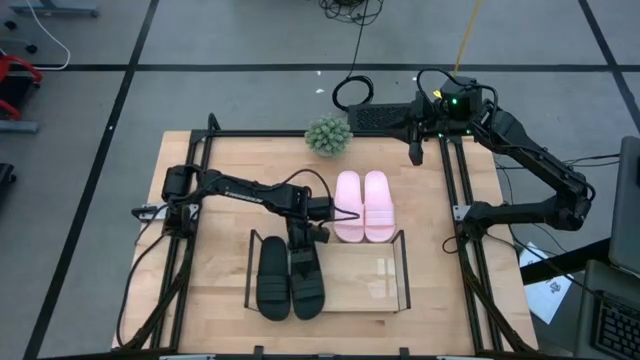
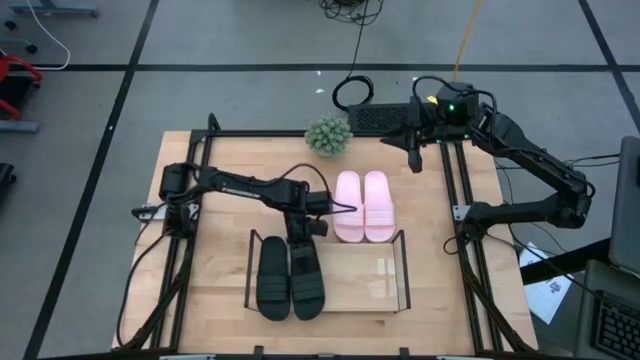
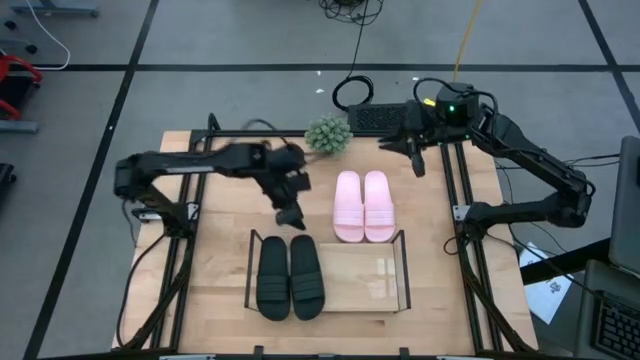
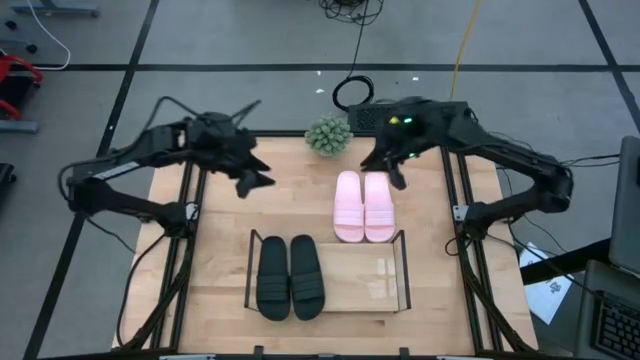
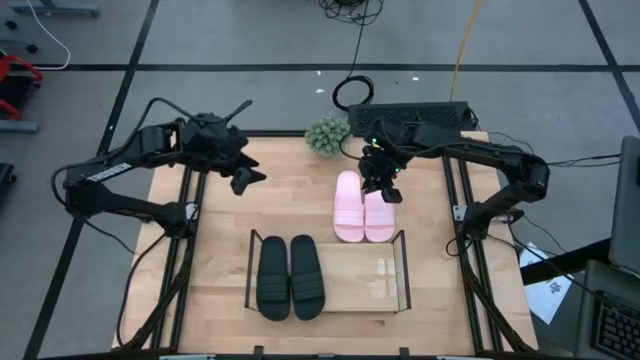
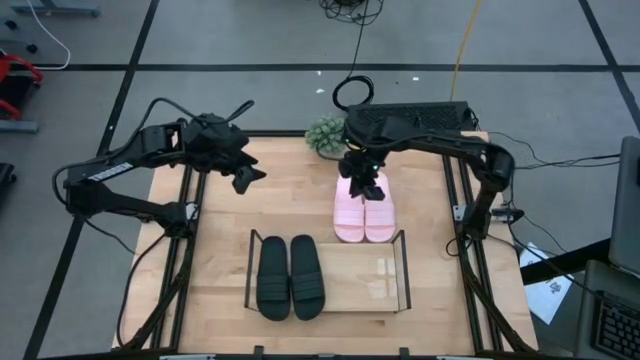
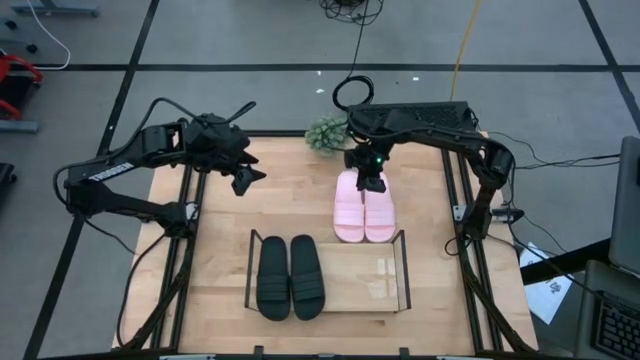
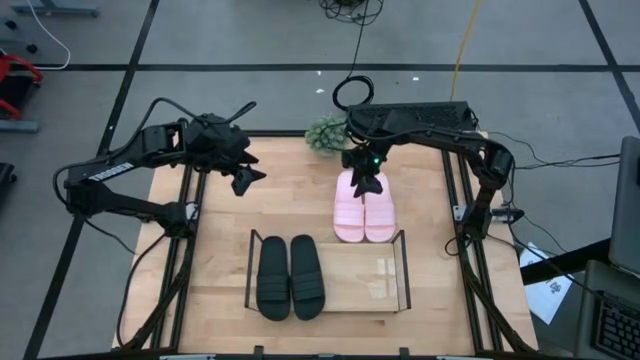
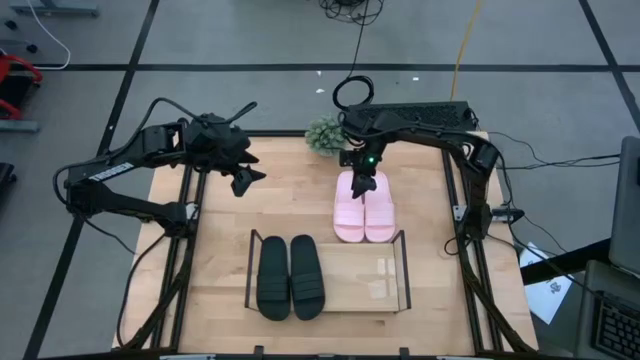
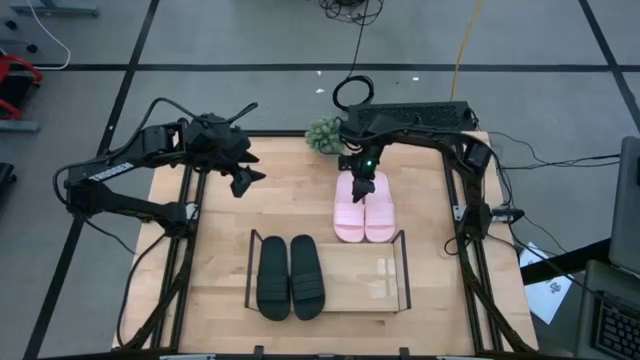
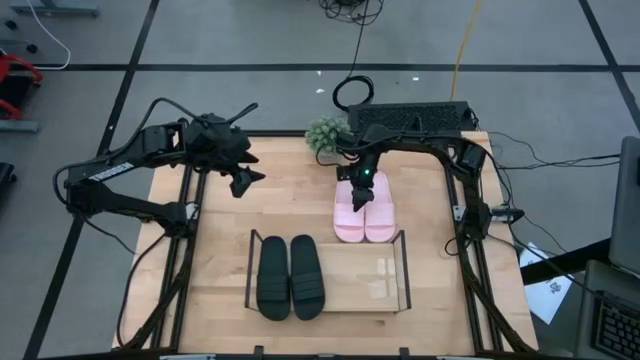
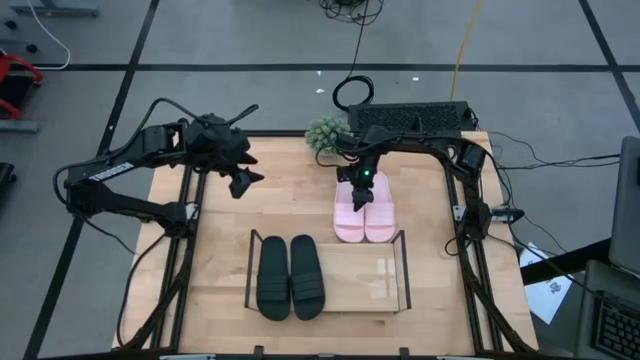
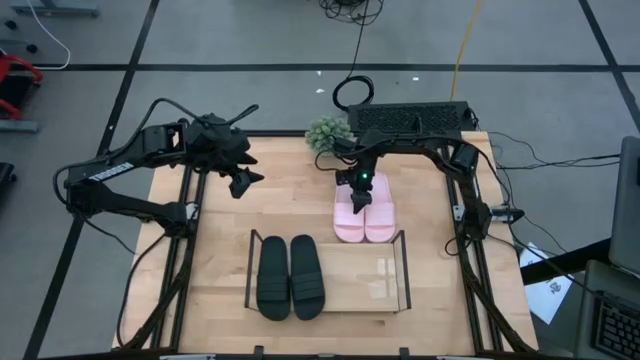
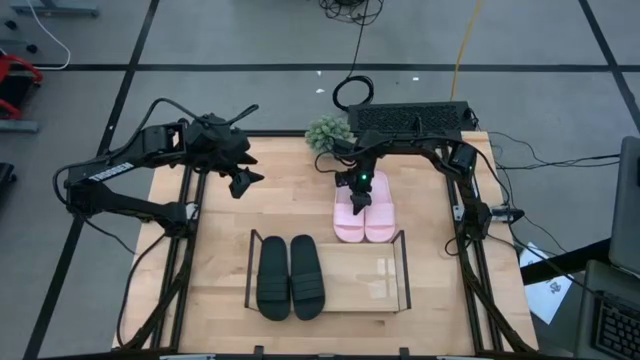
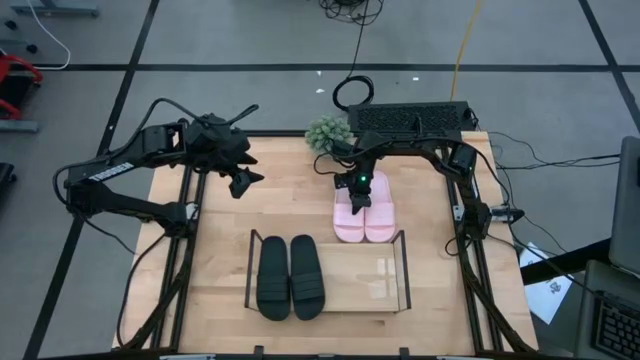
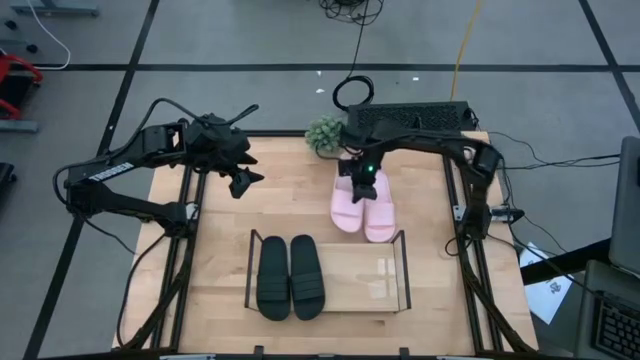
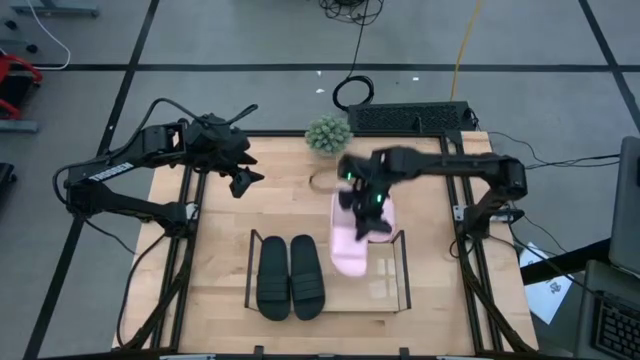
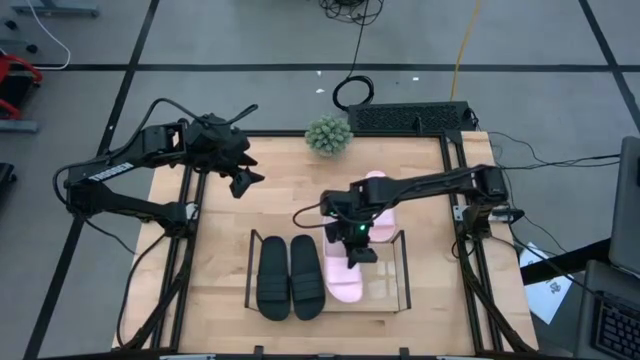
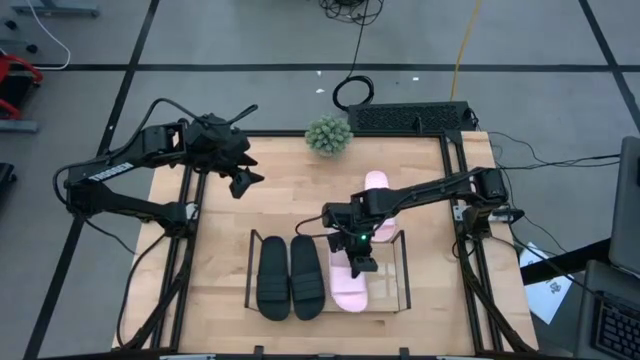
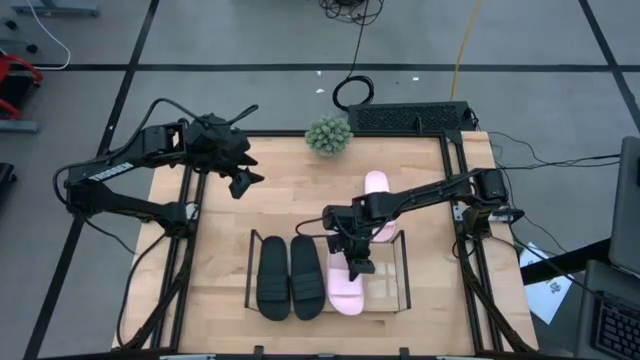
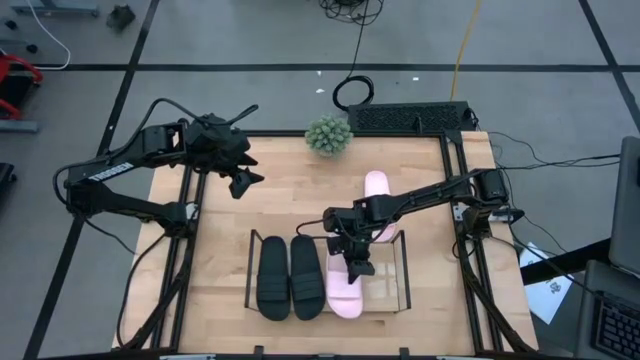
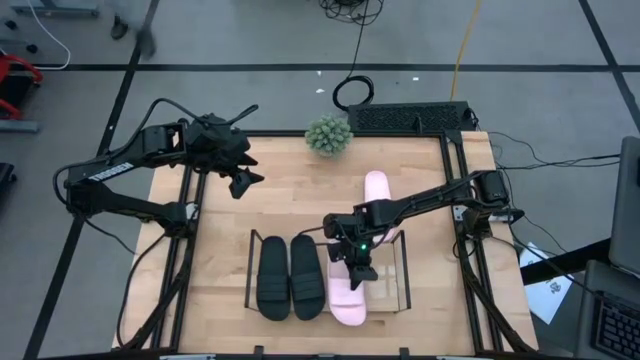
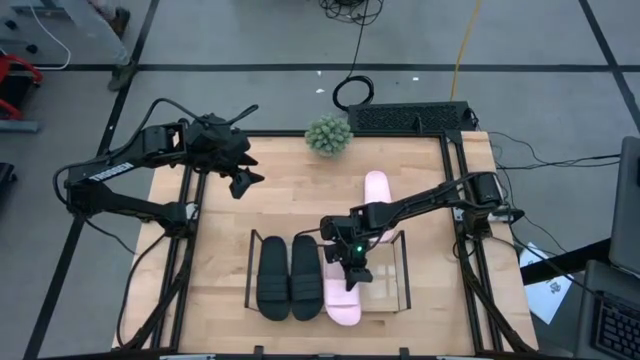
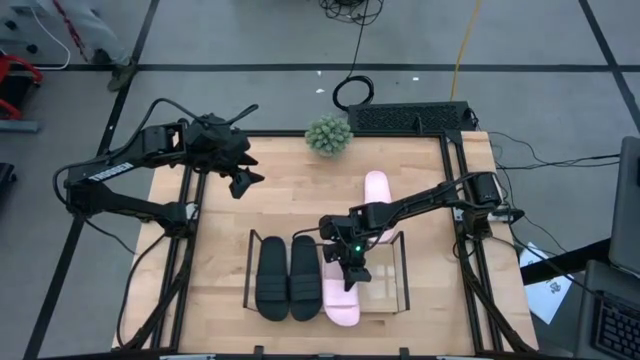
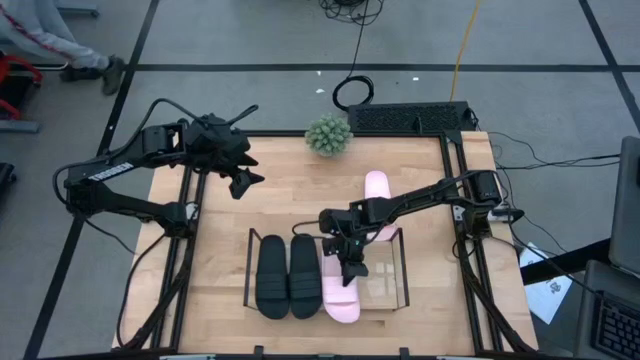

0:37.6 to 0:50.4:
Task: Pick and place slides into the shelf
Put the left pink slipper on the shelf

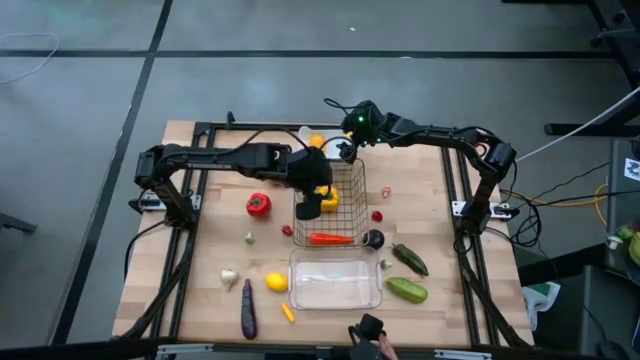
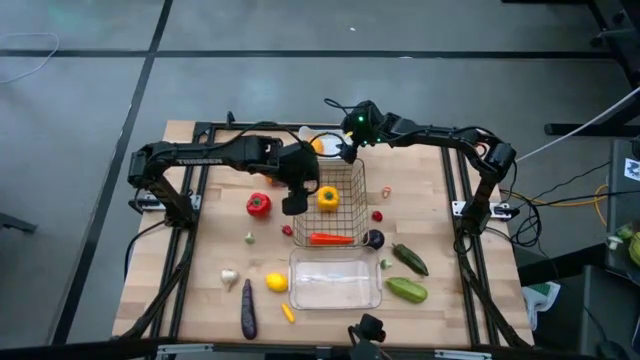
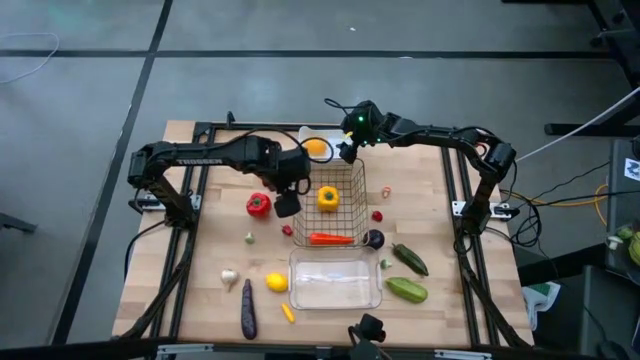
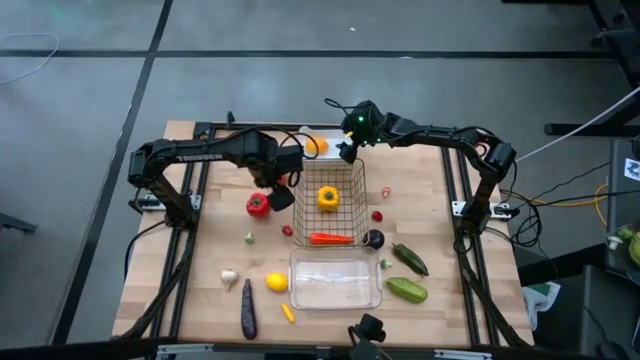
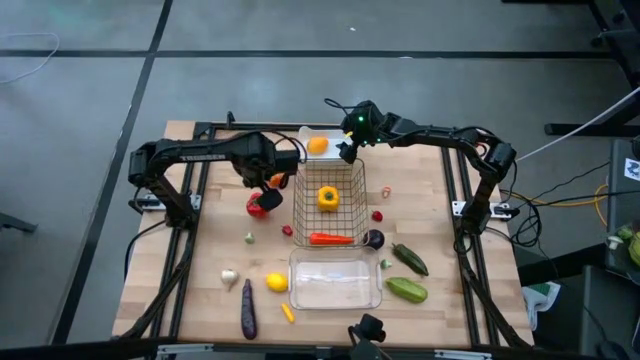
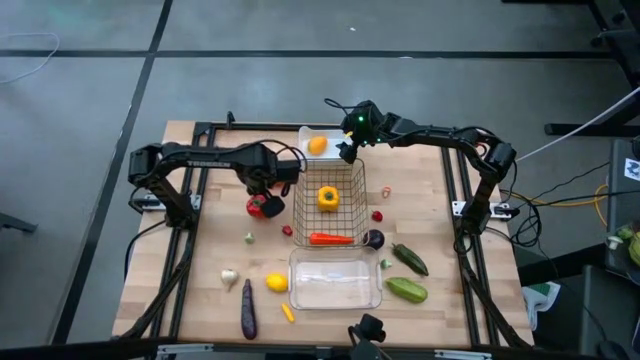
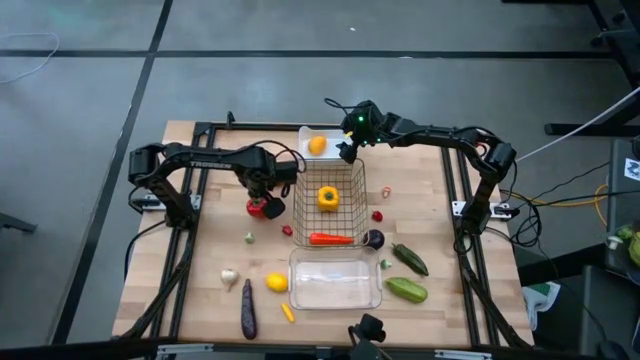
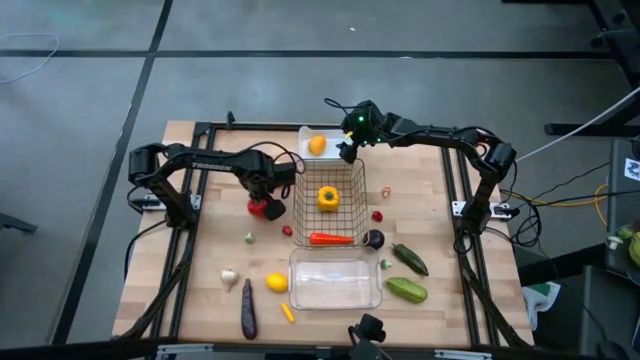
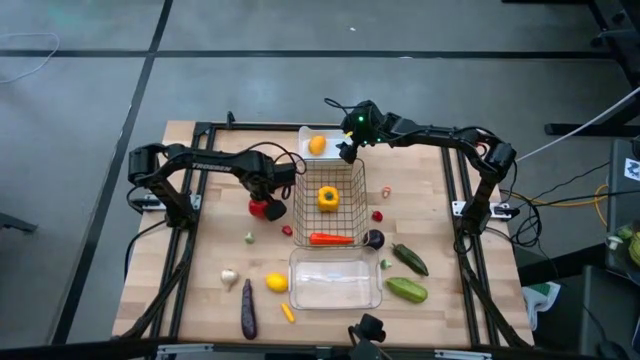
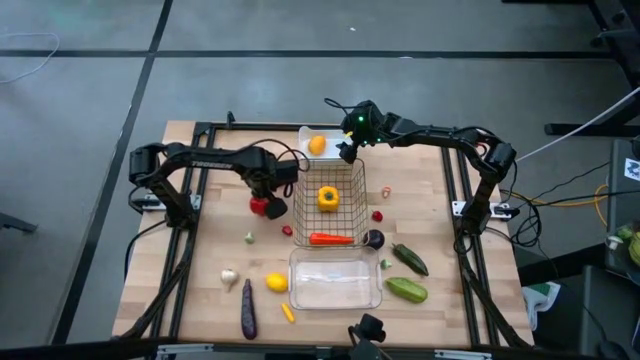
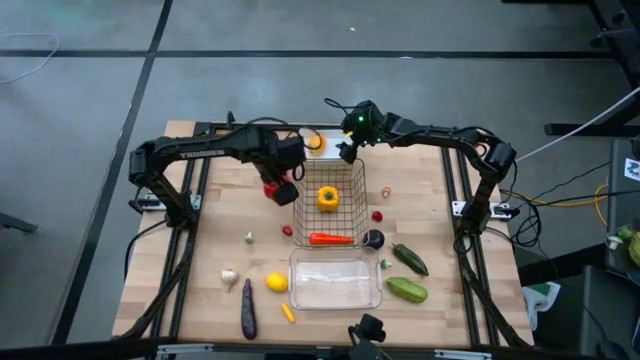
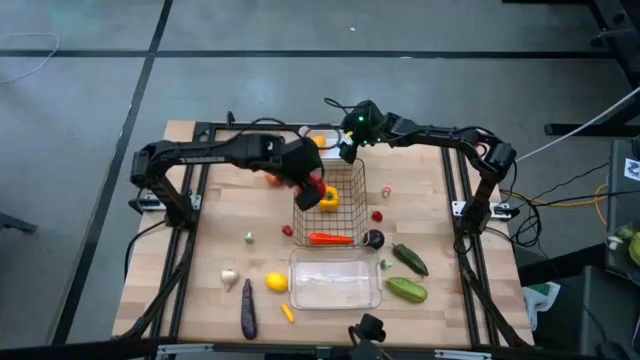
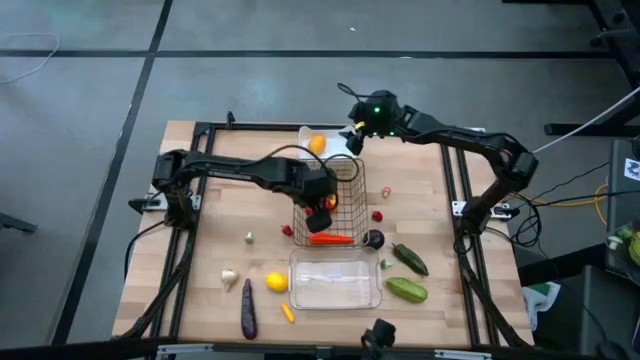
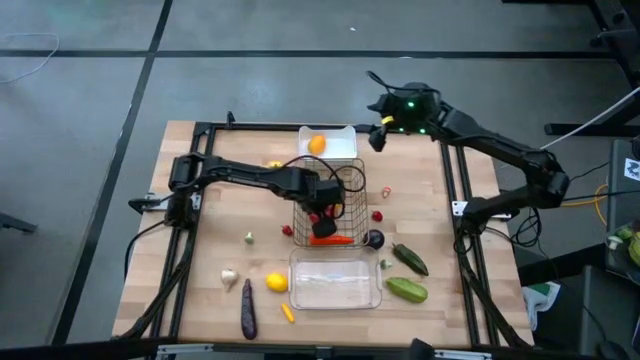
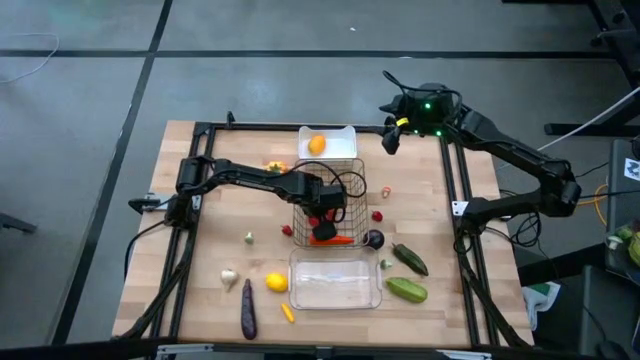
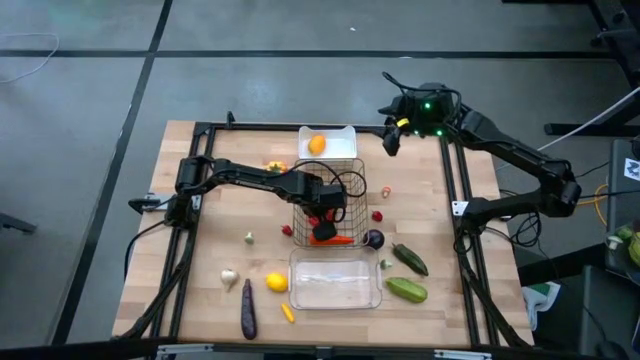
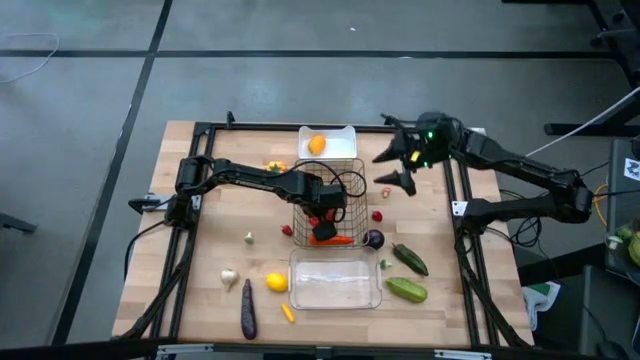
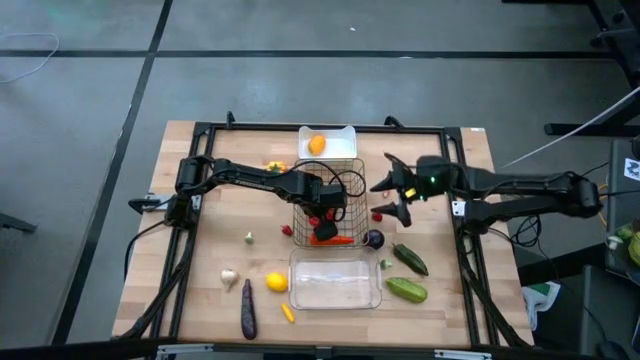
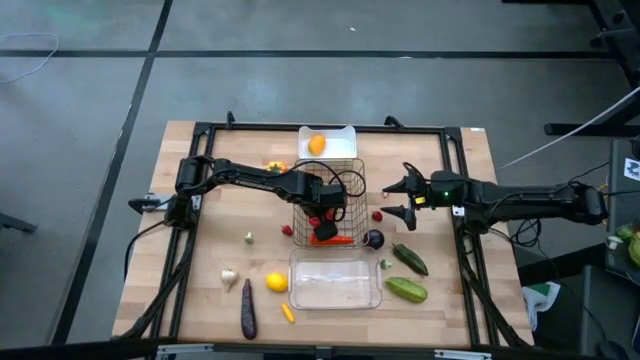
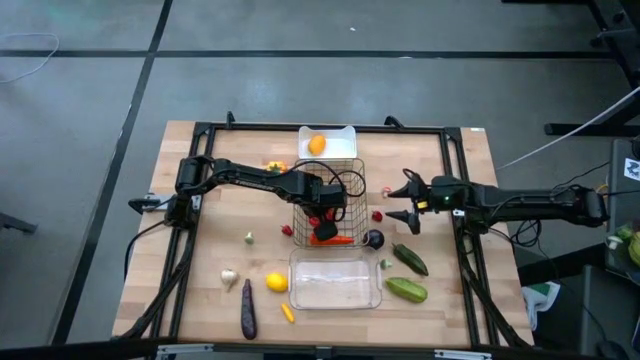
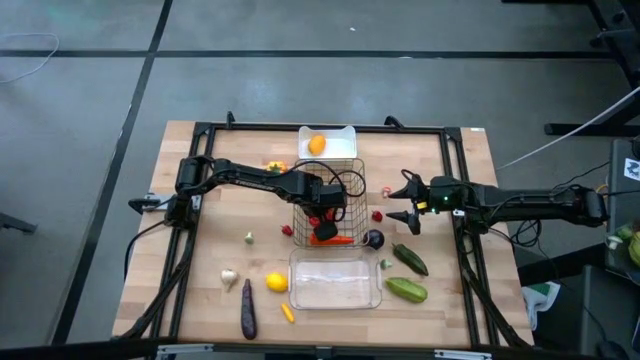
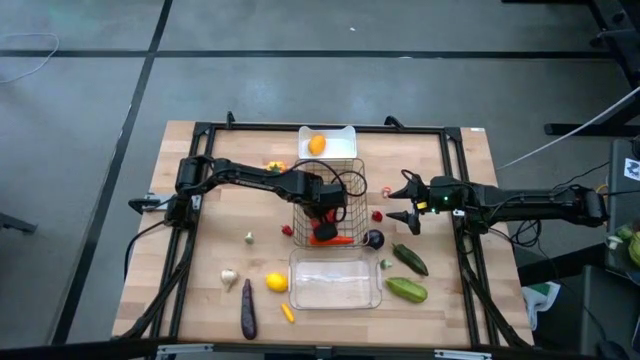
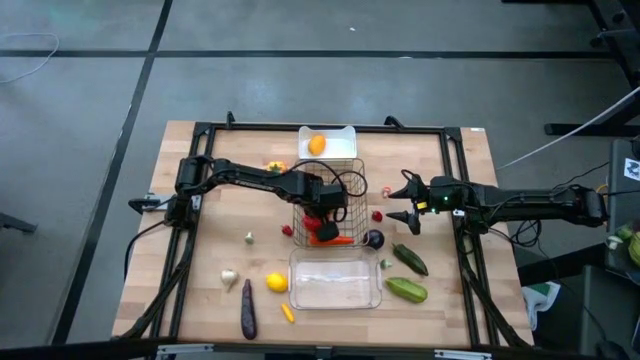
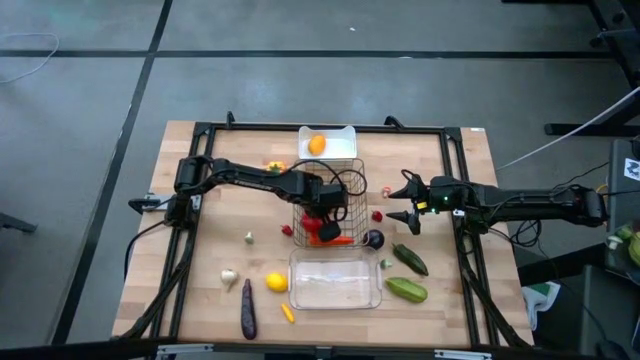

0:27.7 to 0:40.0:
Task: Sort produce into baskets
Put the red bell pepper into the wire basket
